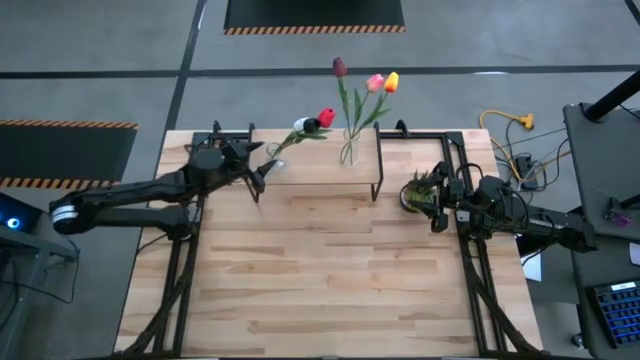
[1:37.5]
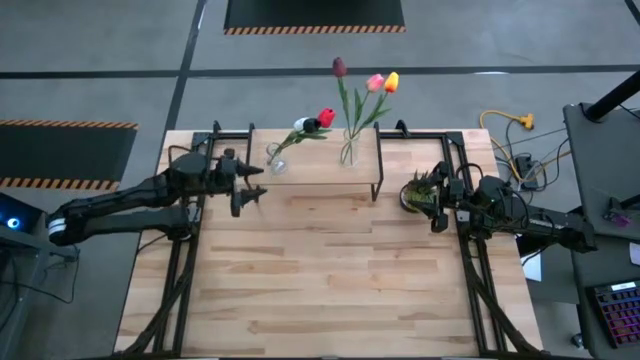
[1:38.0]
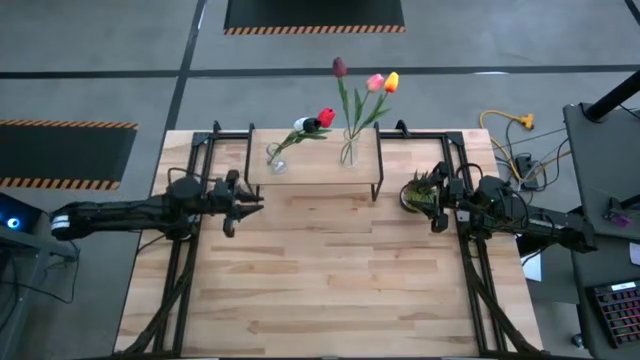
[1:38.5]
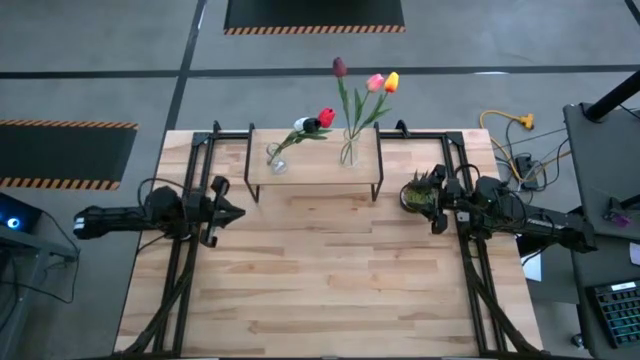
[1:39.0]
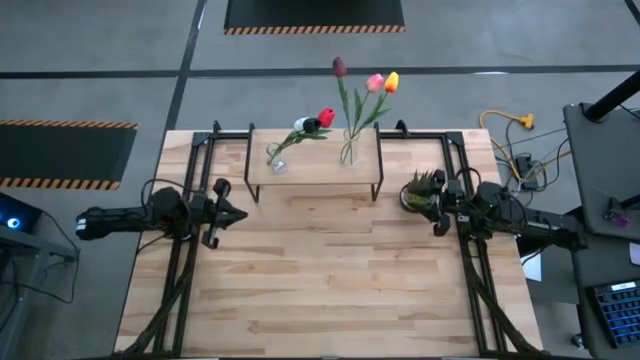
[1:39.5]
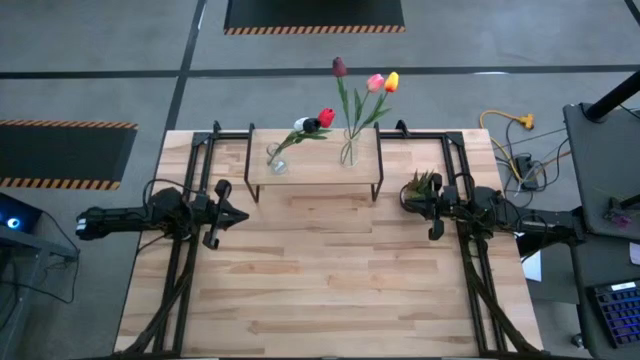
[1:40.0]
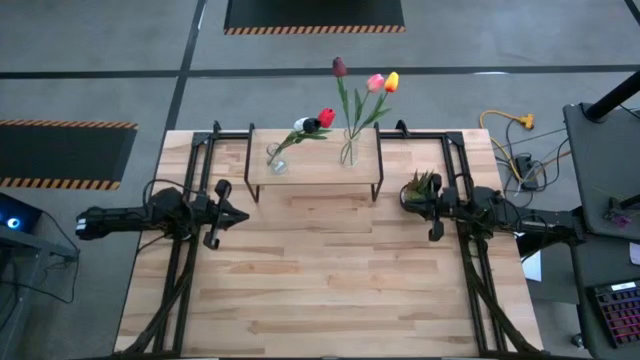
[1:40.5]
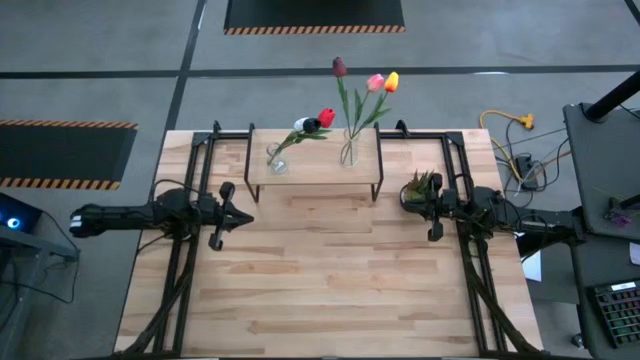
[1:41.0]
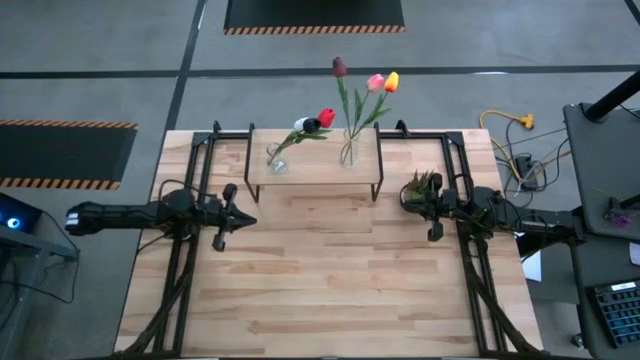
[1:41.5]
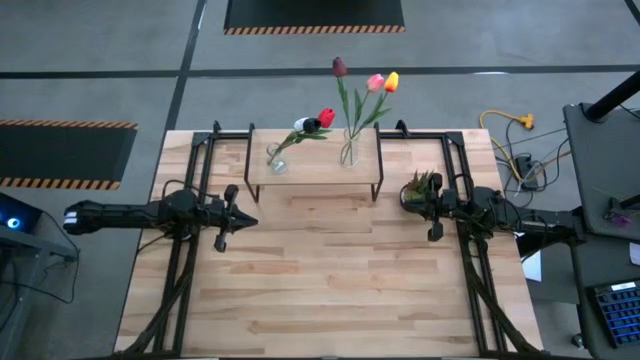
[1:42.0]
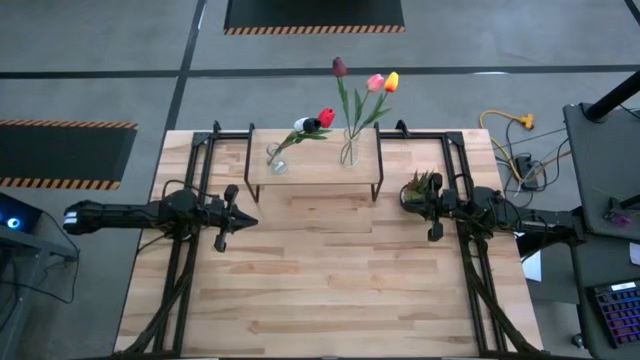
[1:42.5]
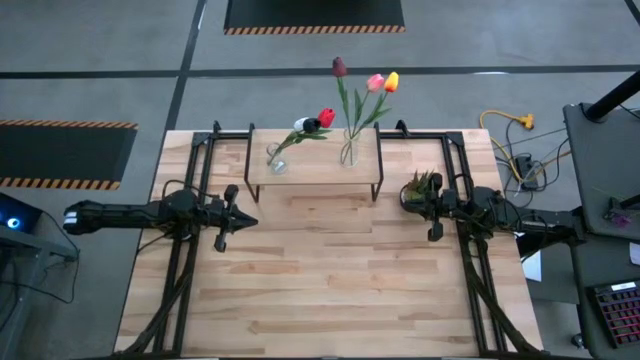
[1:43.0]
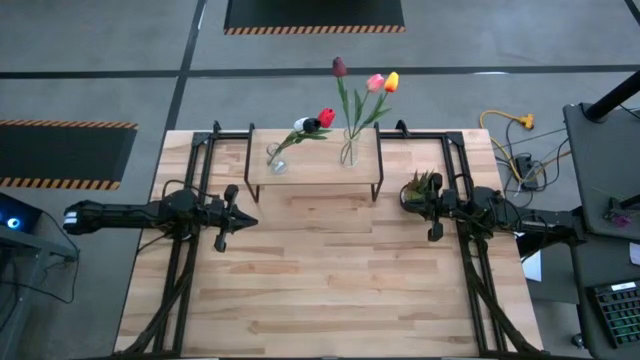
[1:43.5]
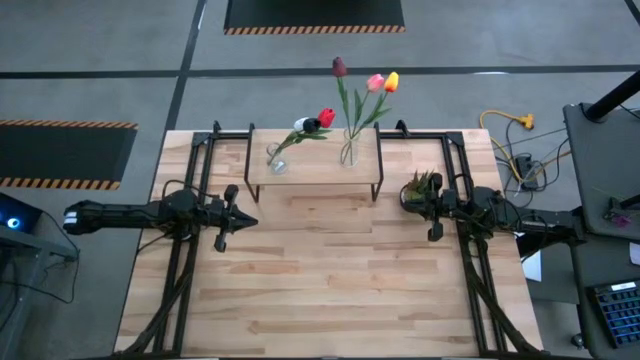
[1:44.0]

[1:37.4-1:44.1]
Task: Pick and place flowers into a vace then onto a shelf
Return to Home Position

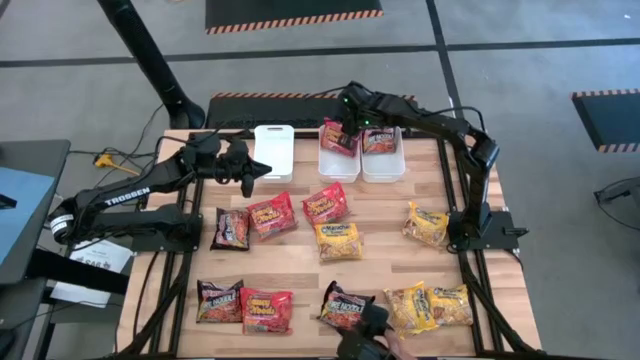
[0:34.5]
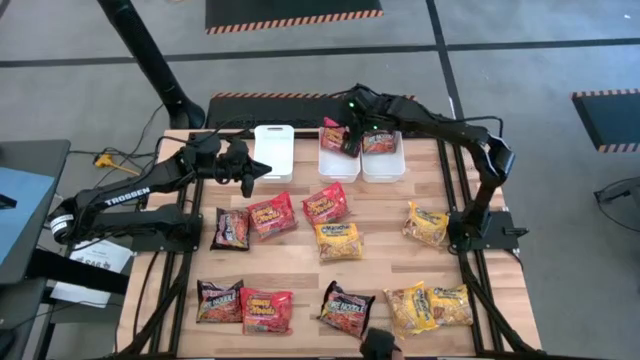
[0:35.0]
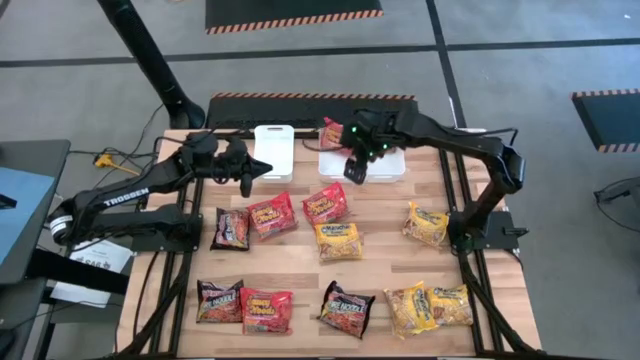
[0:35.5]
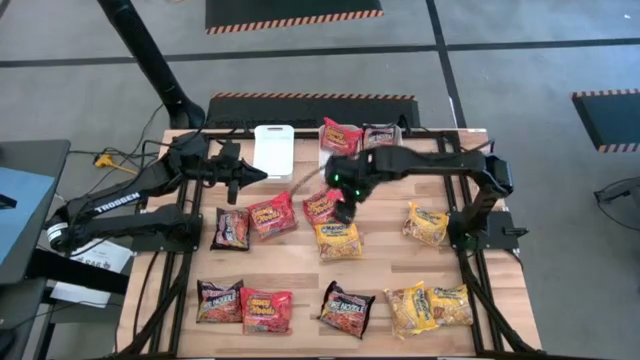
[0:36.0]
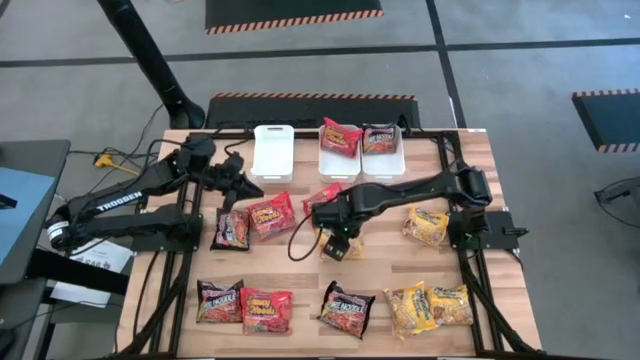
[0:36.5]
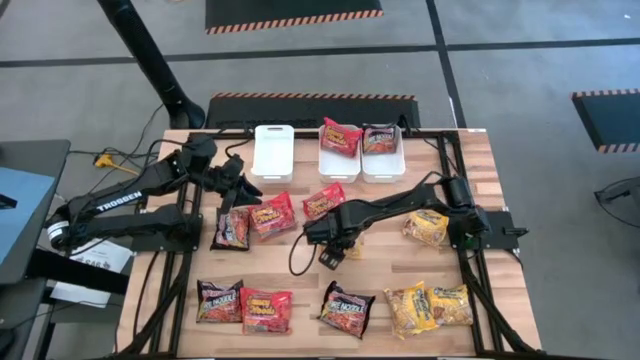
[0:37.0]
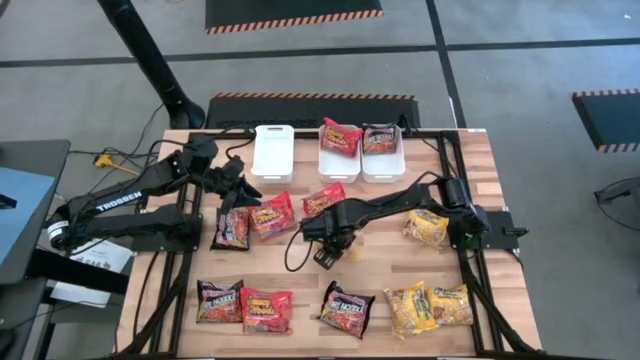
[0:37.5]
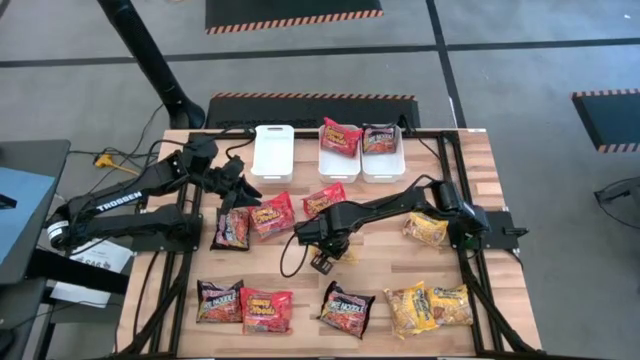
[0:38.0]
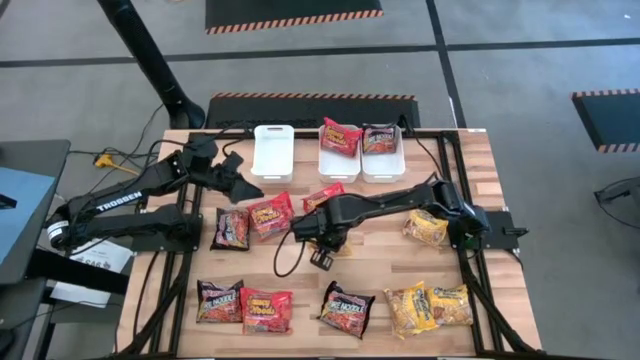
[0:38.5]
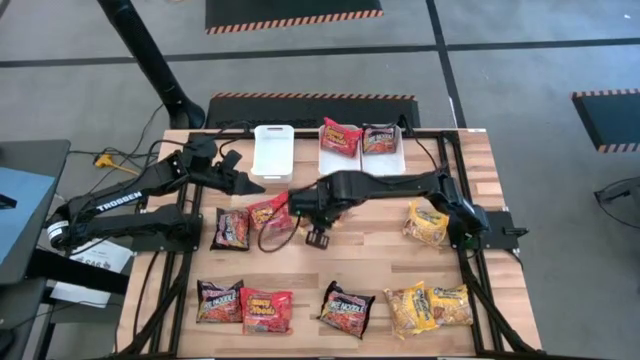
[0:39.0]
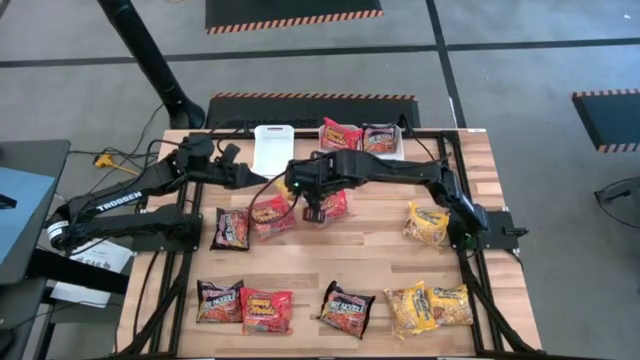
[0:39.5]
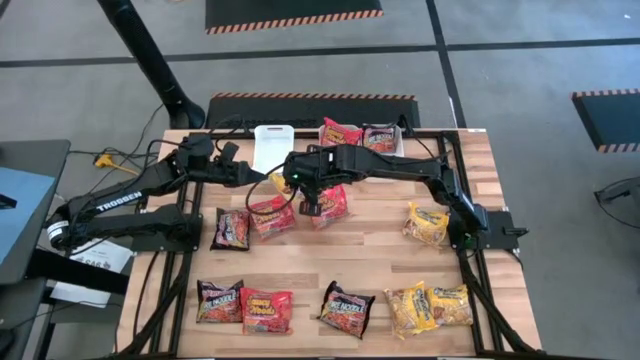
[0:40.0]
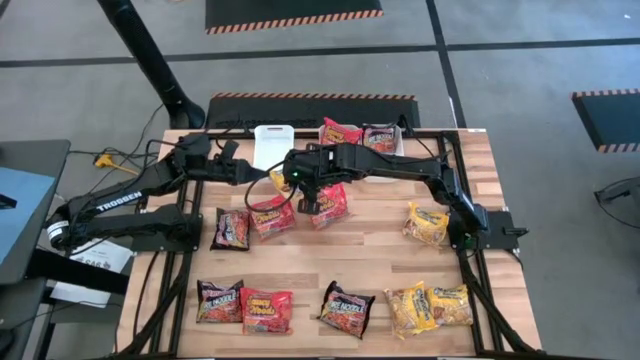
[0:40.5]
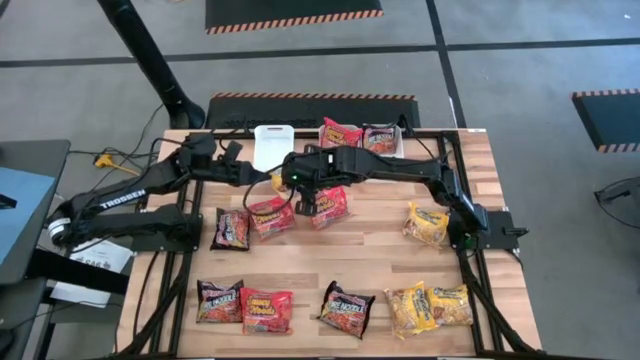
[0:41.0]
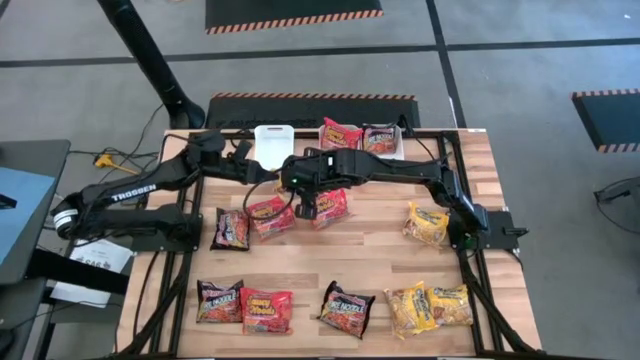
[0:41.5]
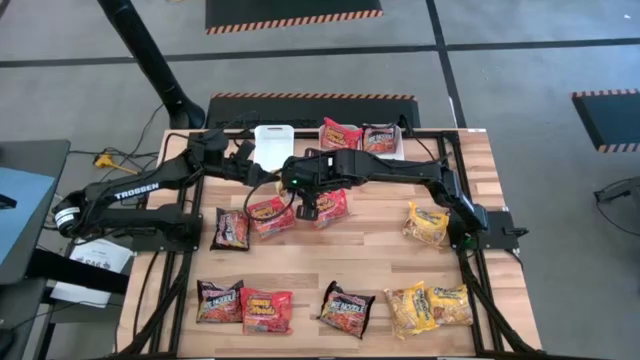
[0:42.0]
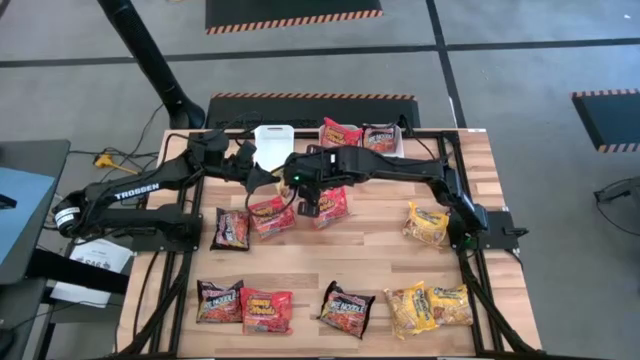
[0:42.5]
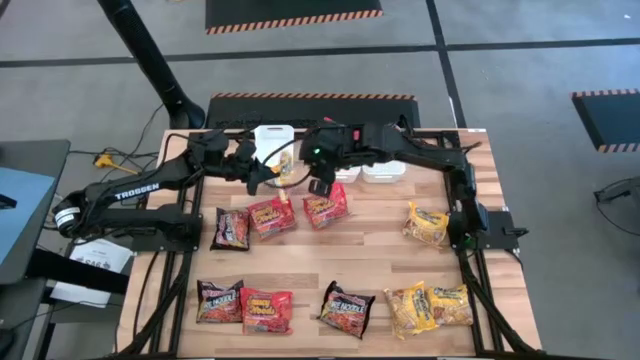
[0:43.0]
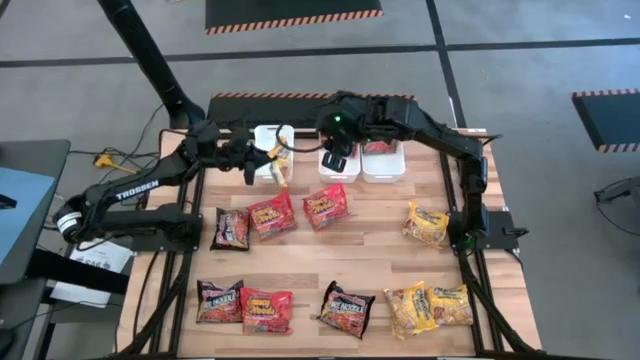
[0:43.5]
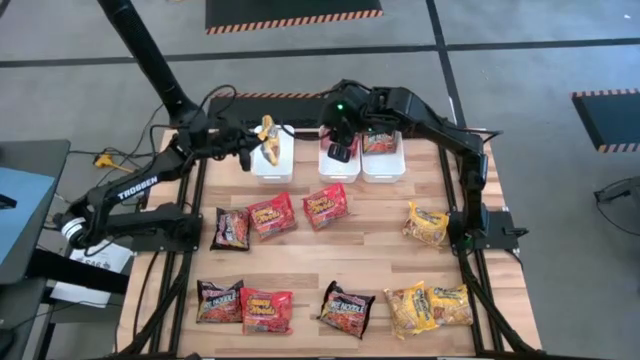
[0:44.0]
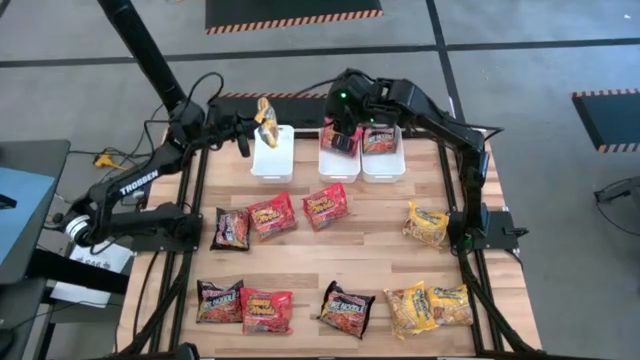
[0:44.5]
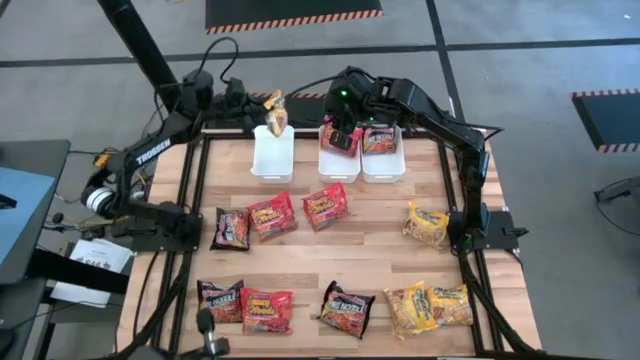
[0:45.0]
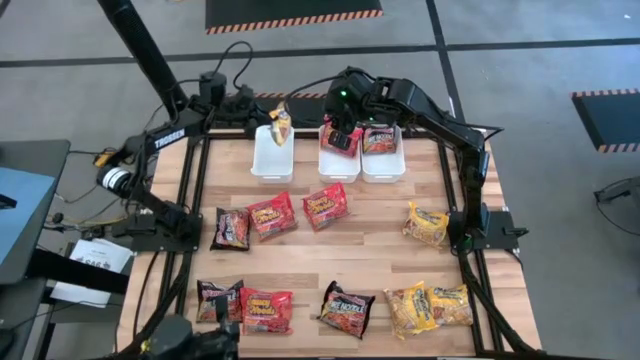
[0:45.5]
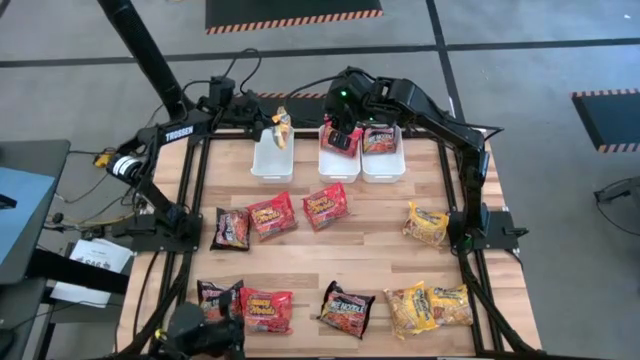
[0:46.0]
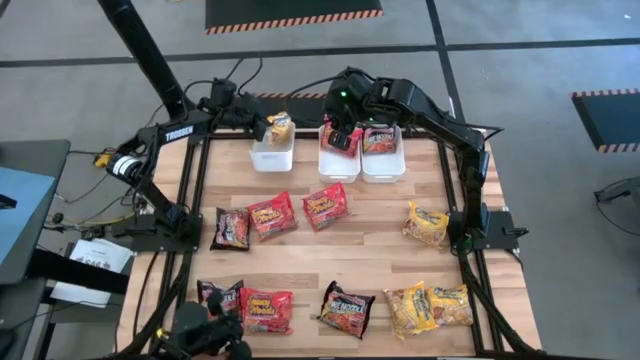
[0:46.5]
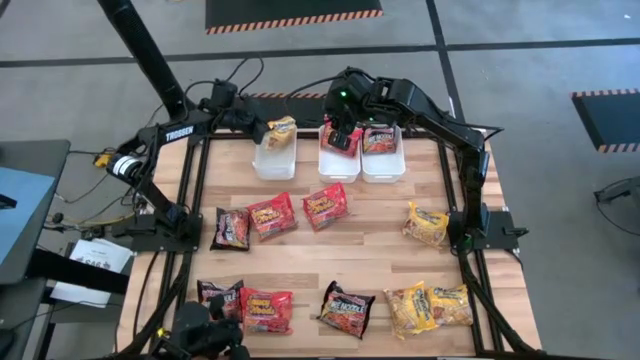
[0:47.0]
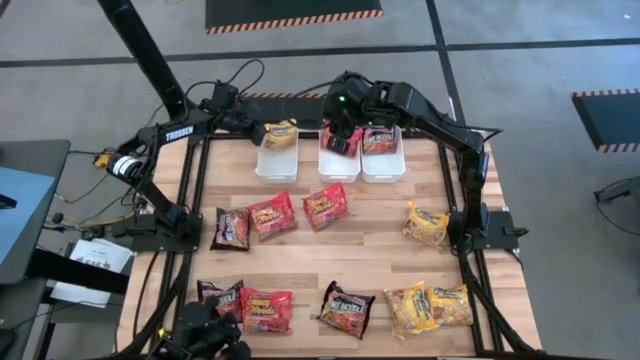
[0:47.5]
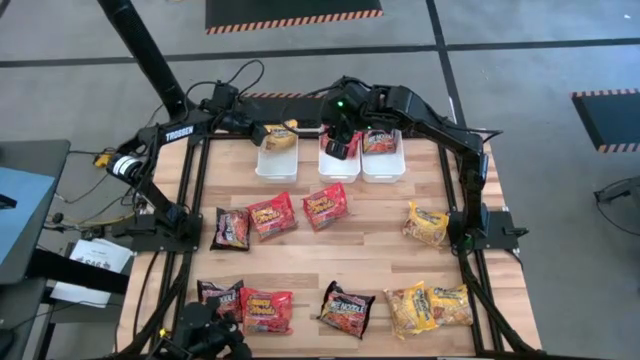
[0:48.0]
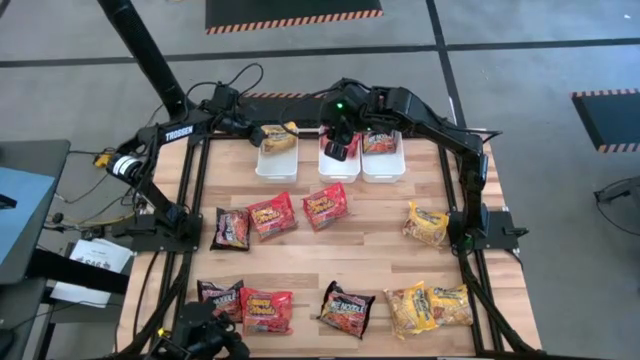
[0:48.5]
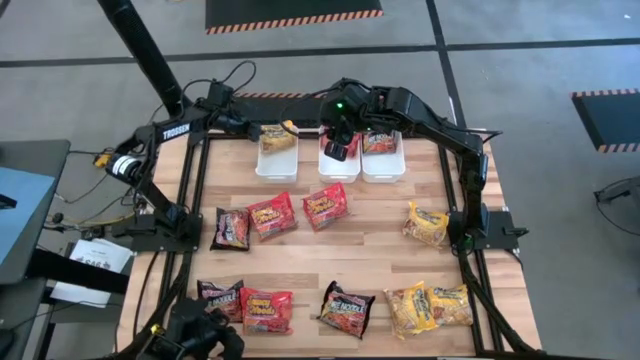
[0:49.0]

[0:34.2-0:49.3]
Task: Sort Maruchan noodles
Put the yellow noodle pack into the left white bin
